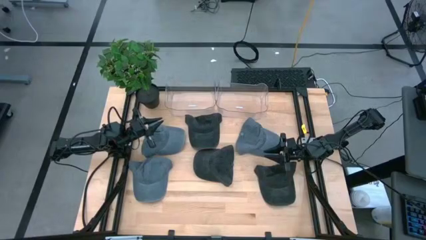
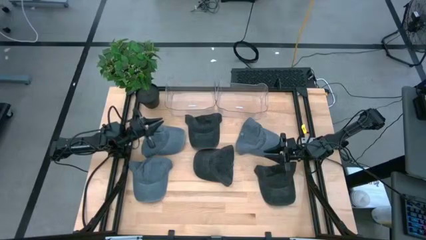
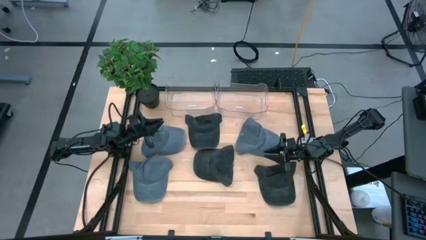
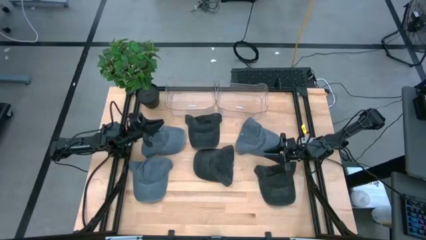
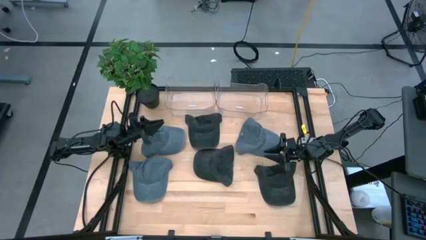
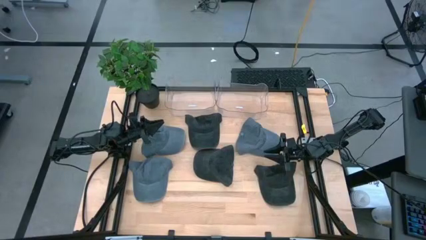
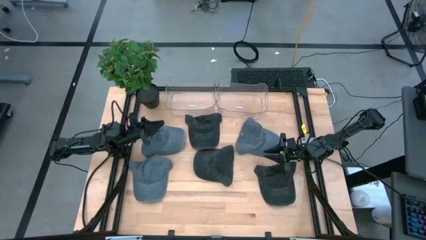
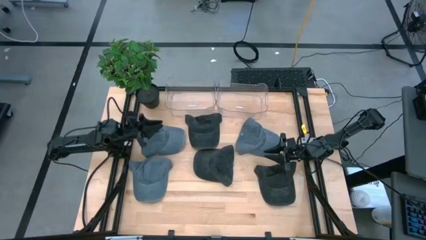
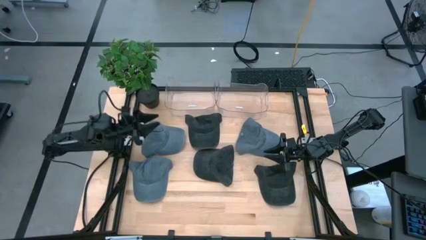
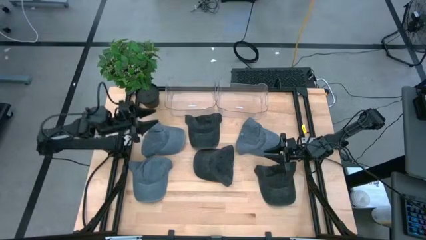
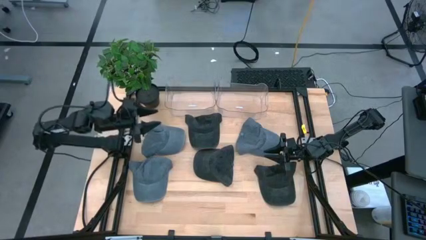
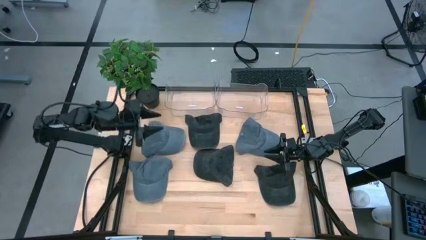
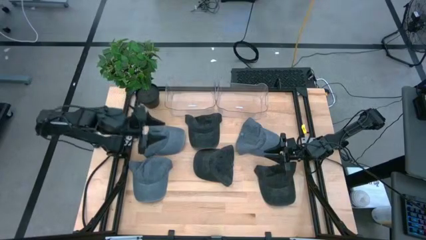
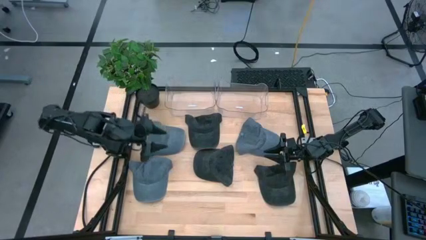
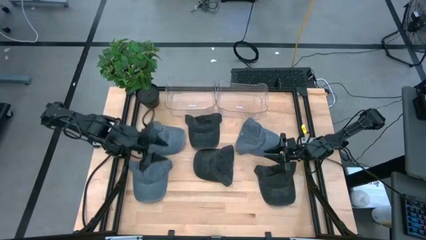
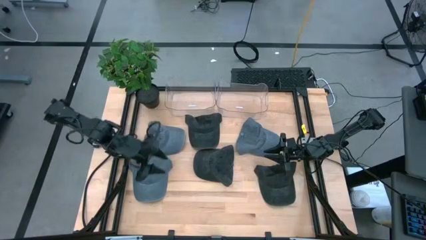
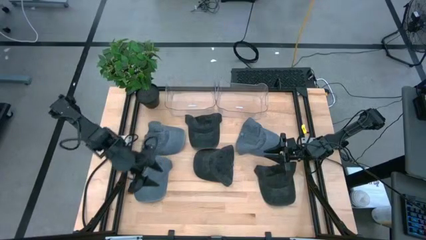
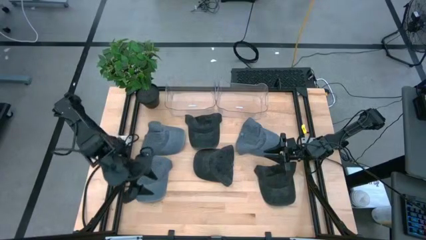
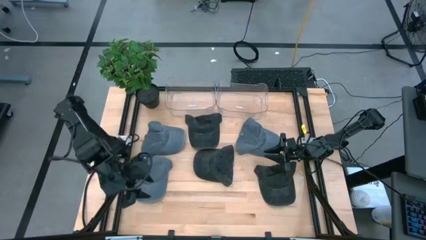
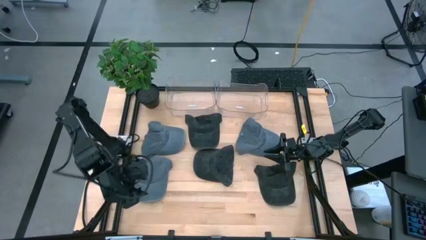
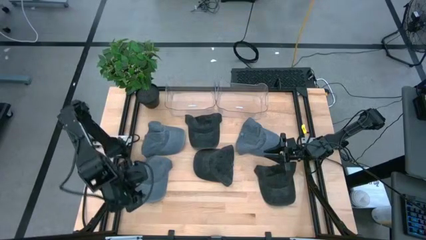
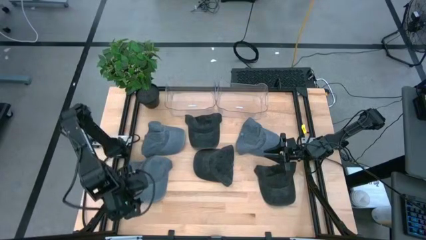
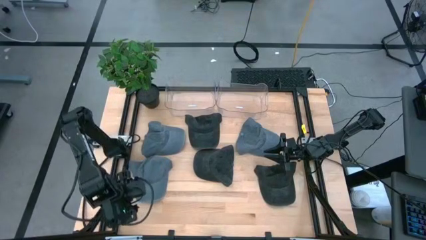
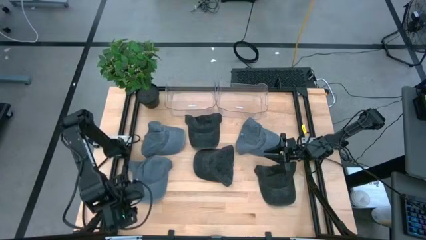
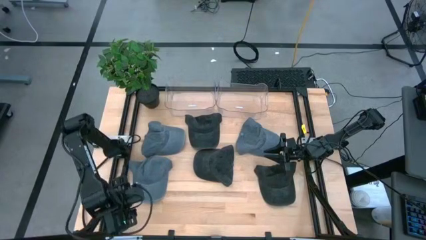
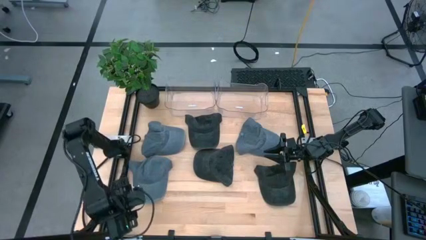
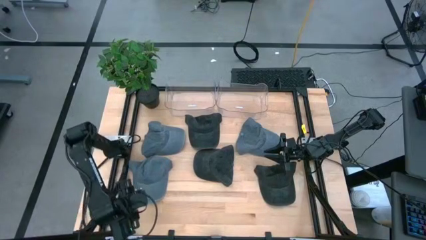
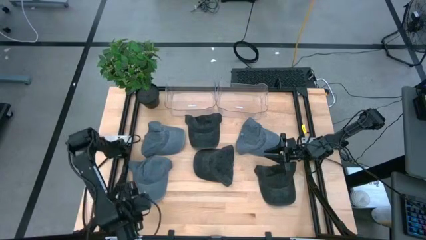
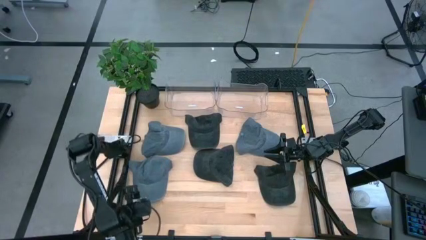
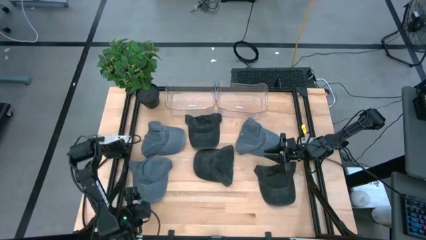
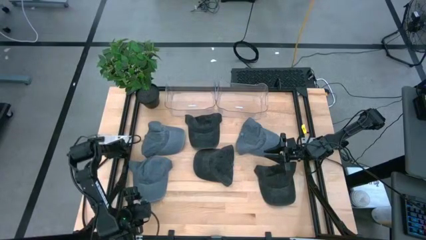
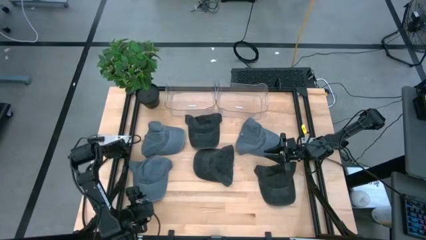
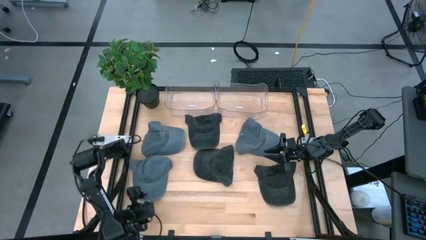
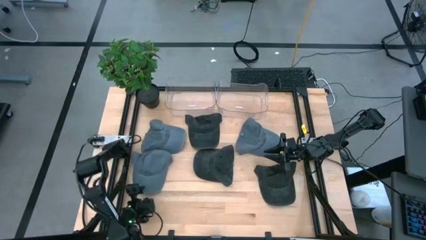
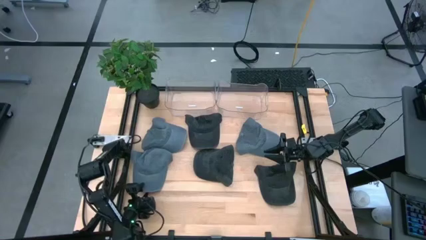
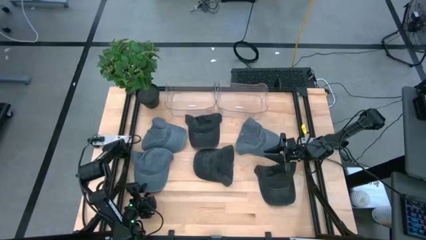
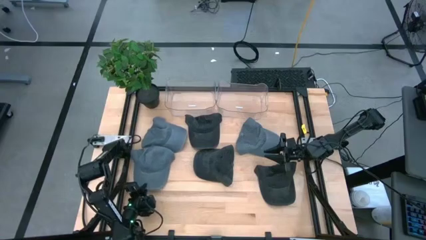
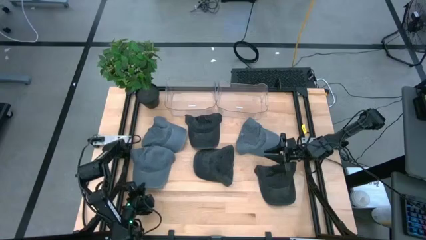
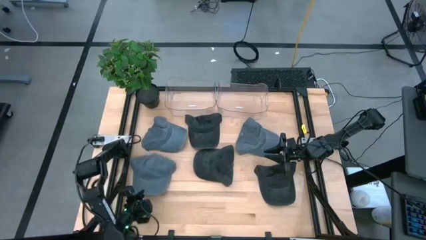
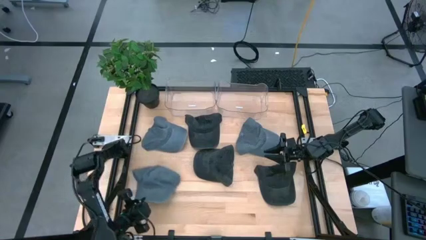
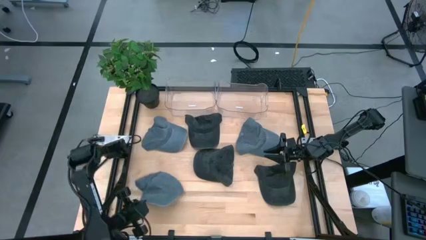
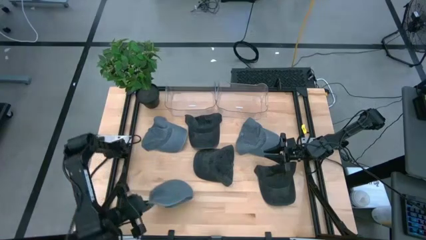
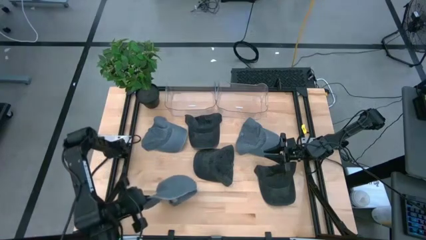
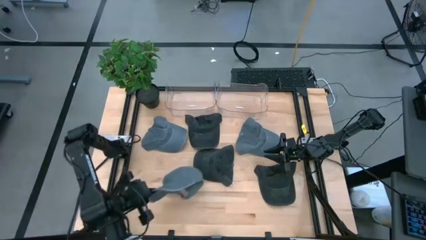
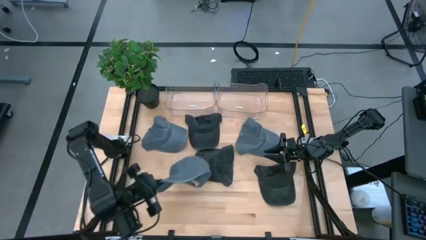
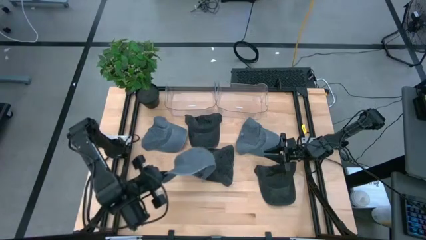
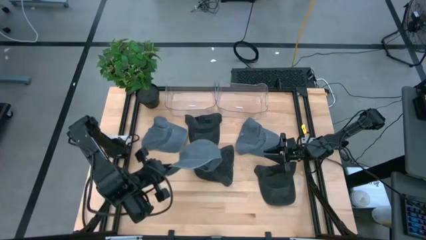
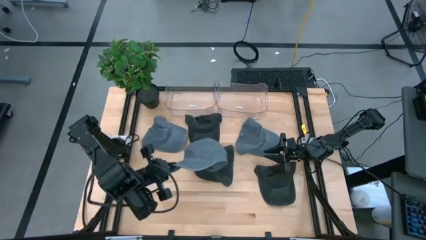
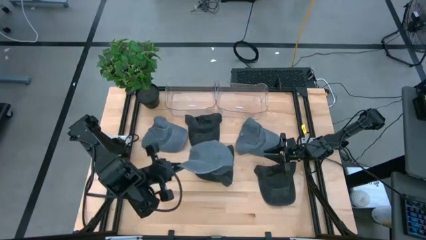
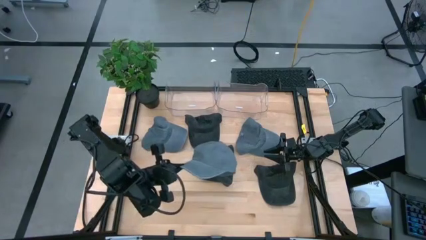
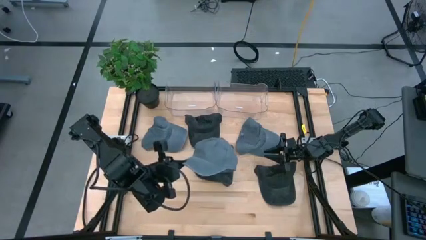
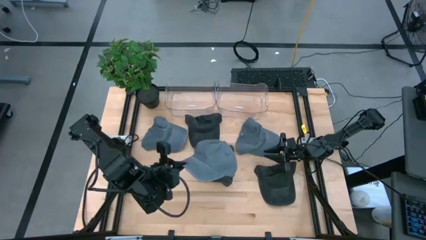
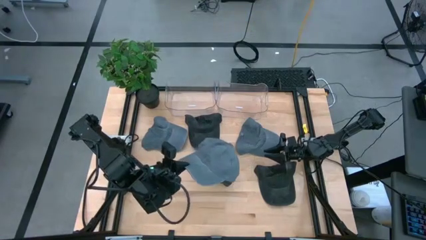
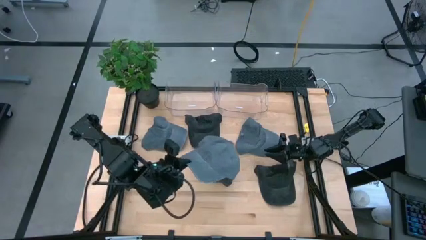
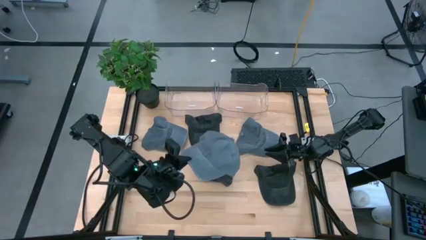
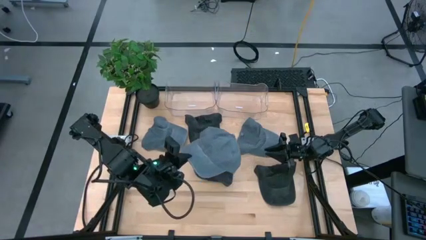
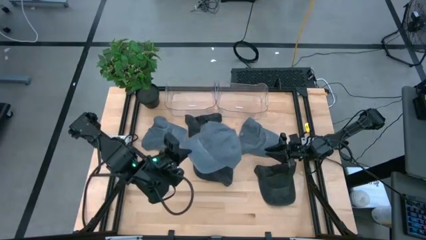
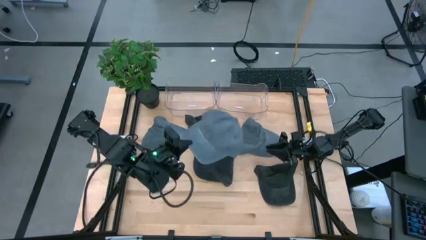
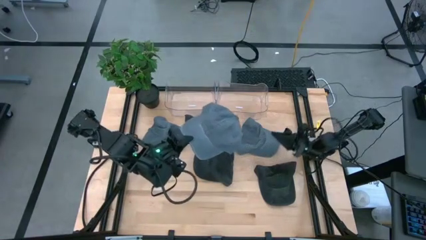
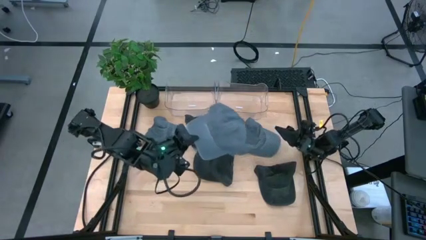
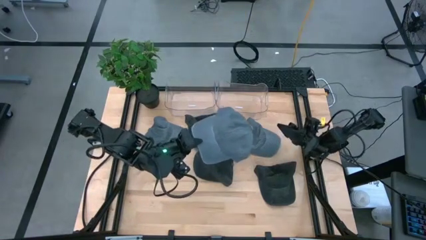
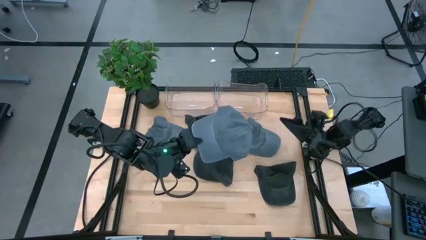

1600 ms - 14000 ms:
Task: Pick & Place hat
Put the bottom left blue cap into the right transparent bin
